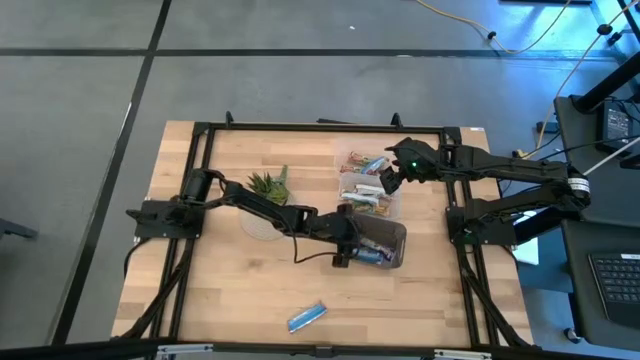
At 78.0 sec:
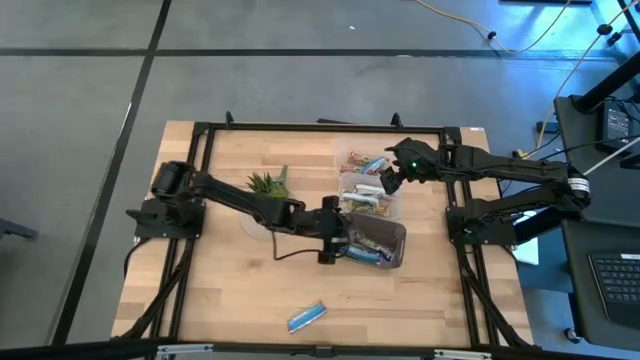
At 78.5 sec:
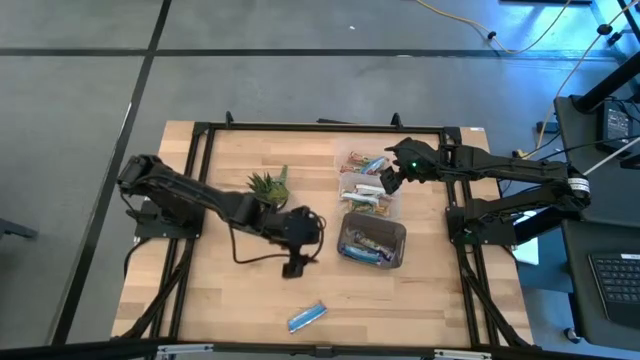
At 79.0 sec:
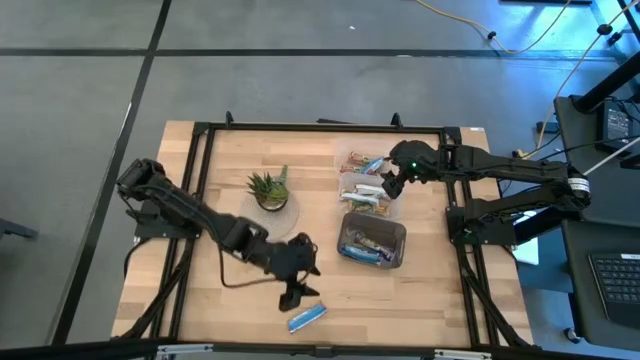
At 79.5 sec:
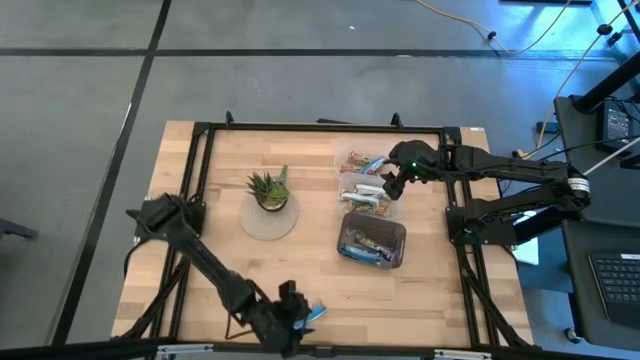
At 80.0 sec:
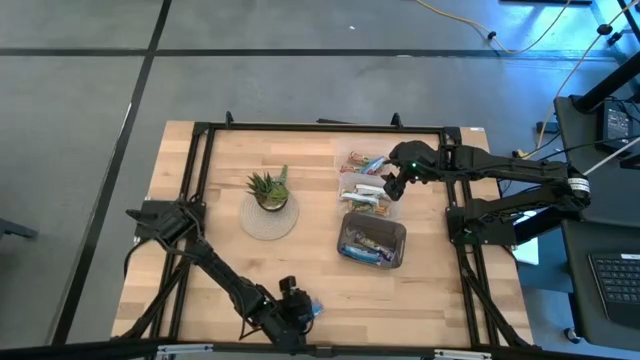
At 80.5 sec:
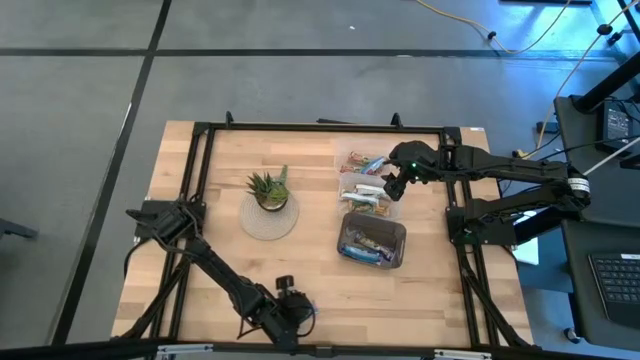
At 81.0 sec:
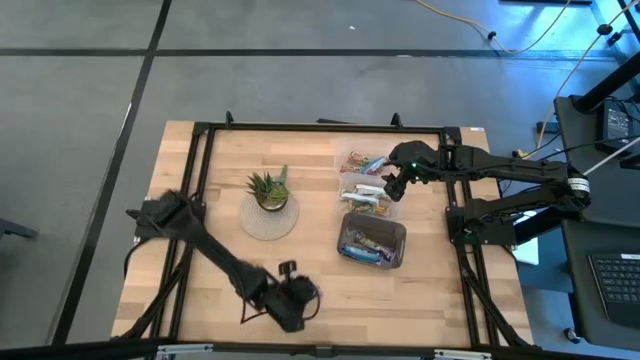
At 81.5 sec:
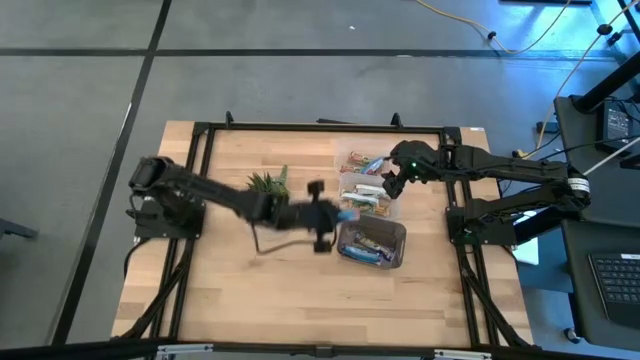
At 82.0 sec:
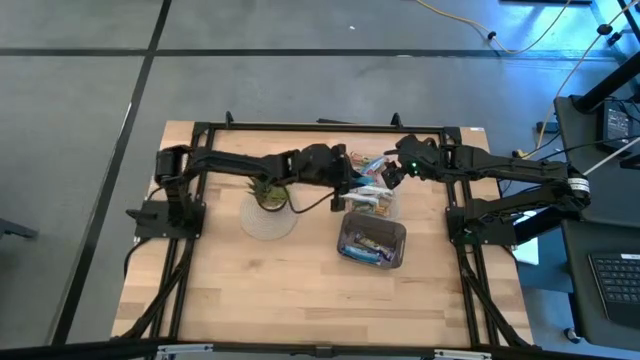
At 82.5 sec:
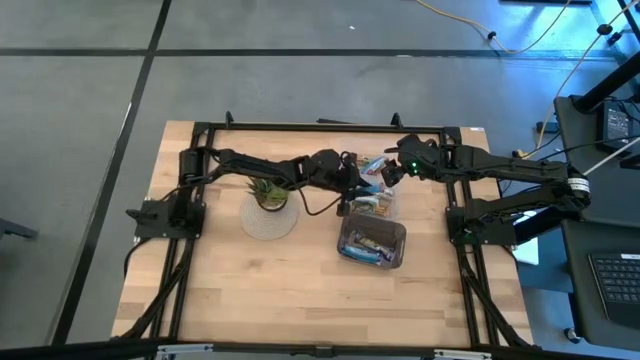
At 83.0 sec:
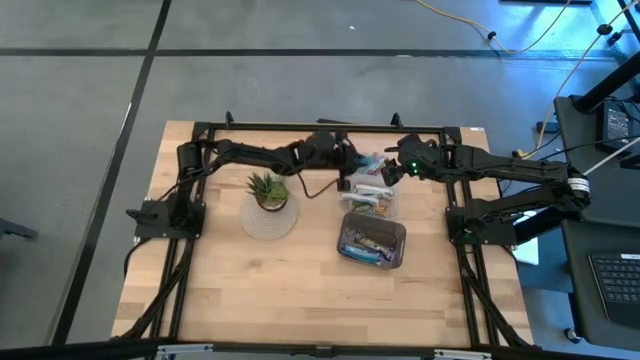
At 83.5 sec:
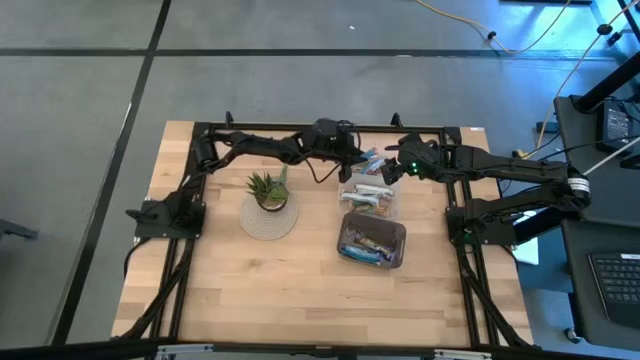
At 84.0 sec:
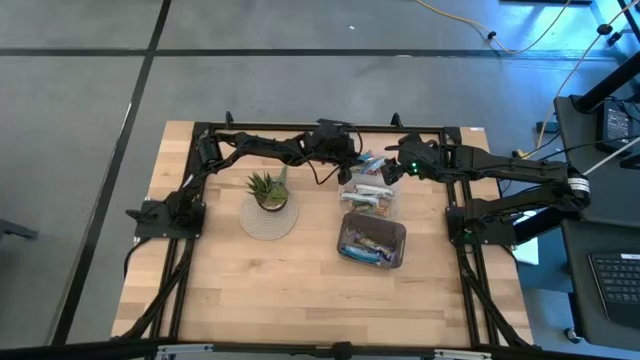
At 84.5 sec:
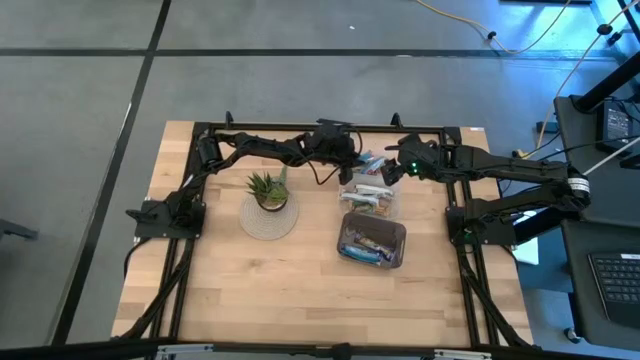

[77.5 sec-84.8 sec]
Task: Pick and place Granola Bars by type
Put the red granola bar into the top transparent bin

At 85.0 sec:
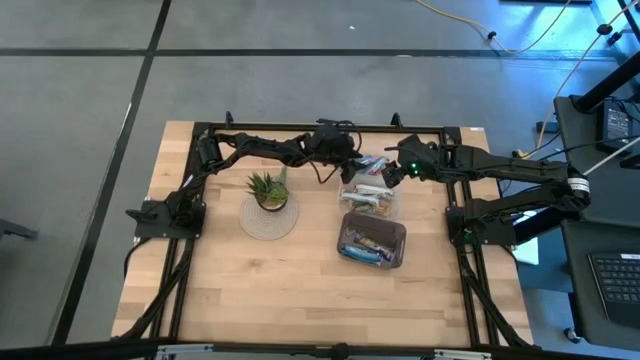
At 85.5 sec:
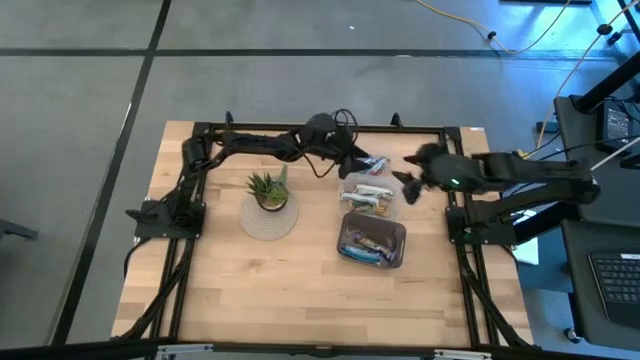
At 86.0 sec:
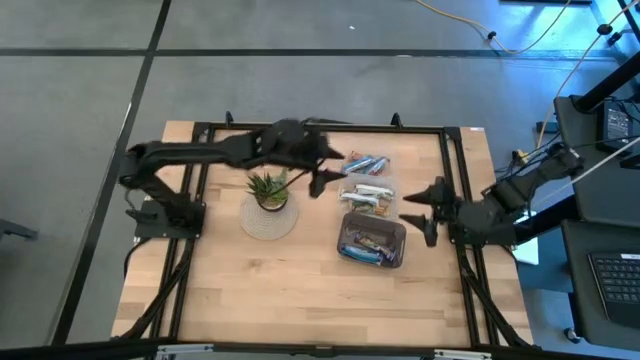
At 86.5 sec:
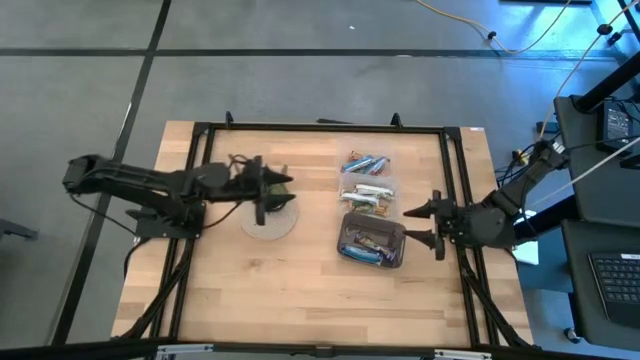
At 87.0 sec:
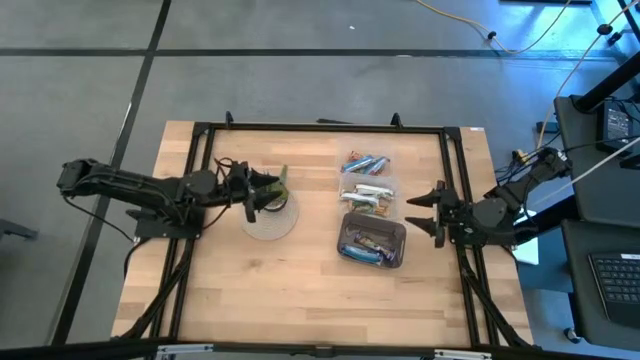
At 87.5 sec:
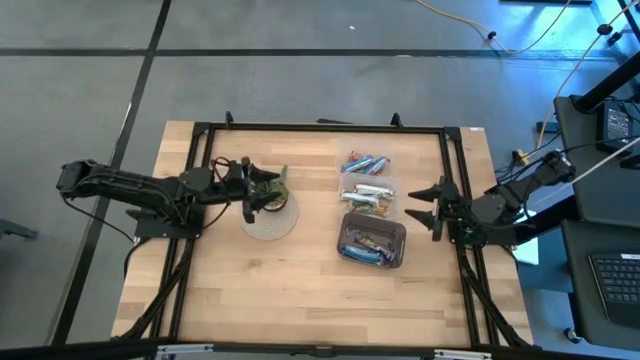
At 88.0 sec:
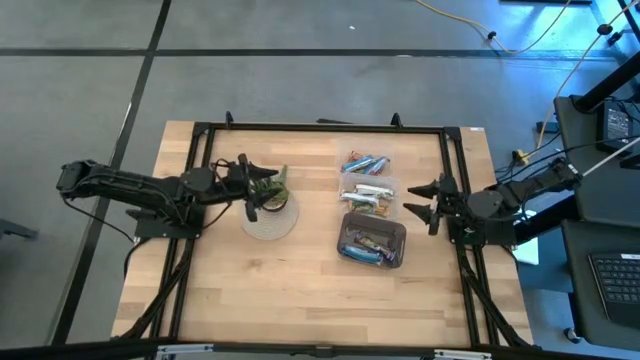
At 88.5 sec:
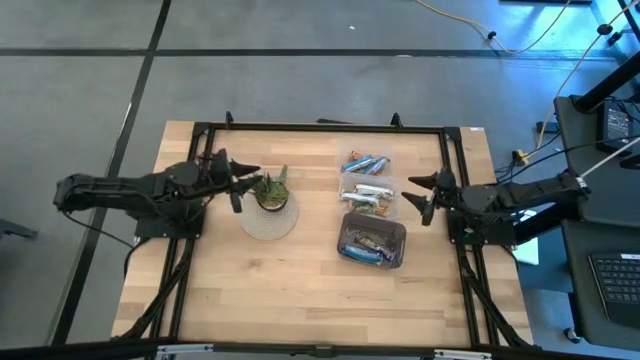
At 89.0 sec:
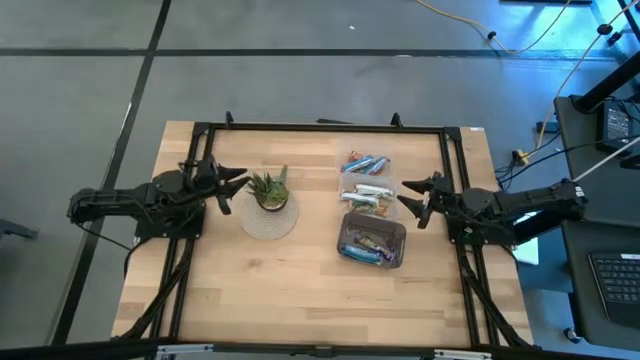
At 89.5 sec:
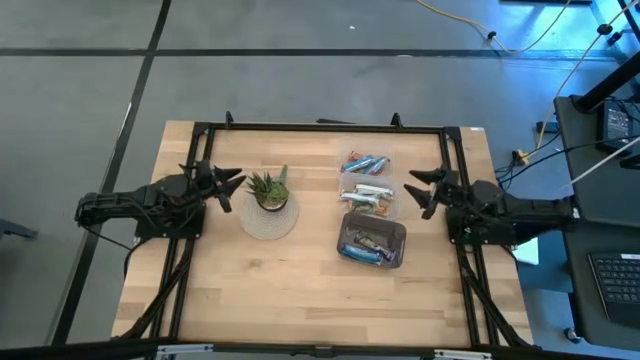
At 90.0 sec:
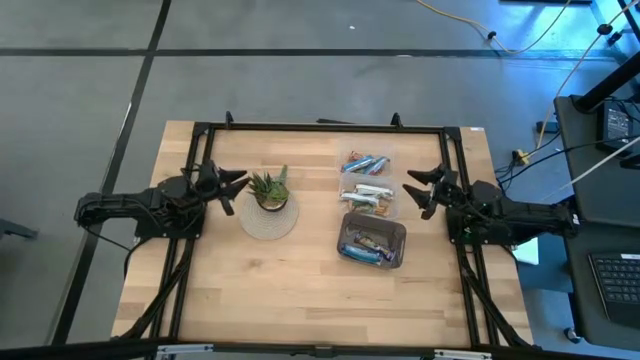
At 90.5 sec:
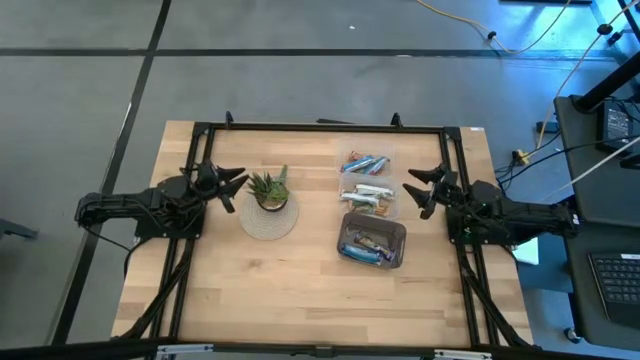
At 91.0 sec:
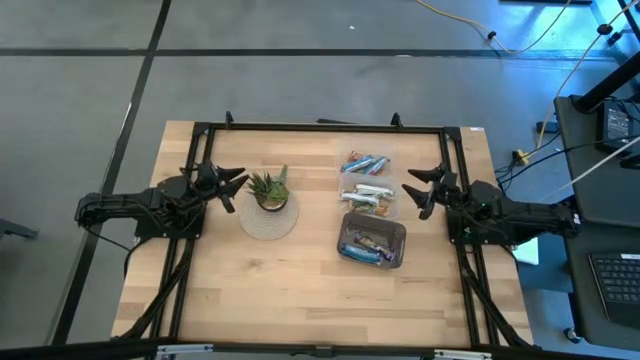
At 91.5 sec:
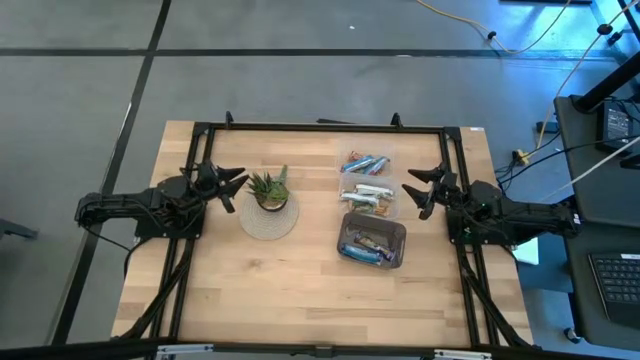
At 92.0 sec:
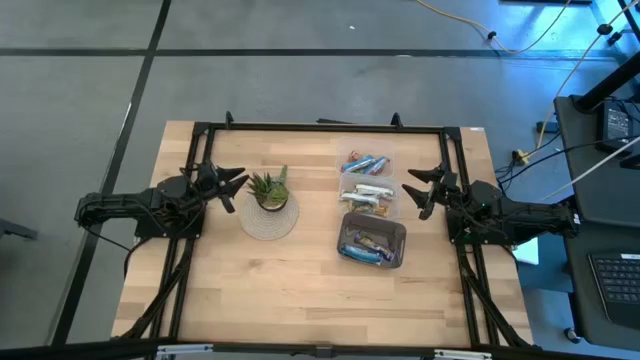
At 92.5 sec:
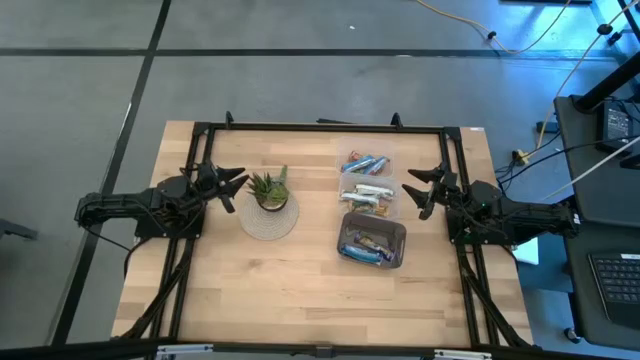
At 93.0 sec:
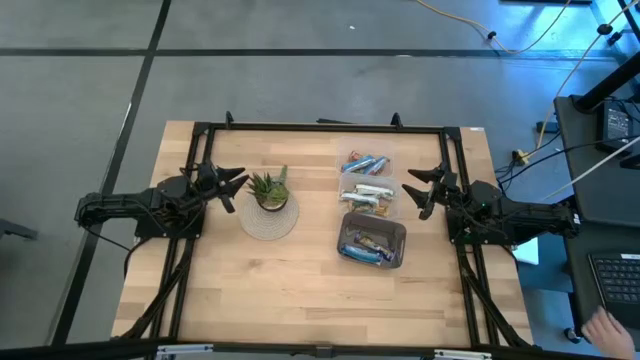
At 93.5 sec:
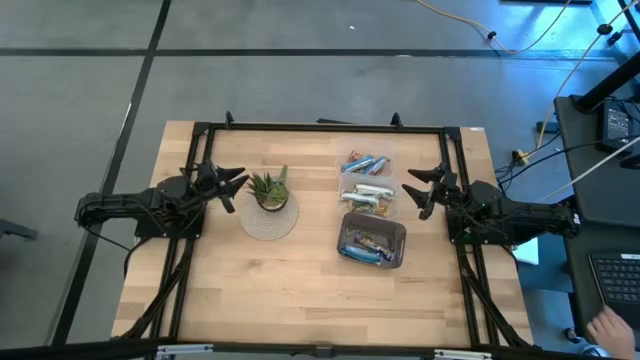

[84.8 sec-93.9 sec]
Return to Home Position

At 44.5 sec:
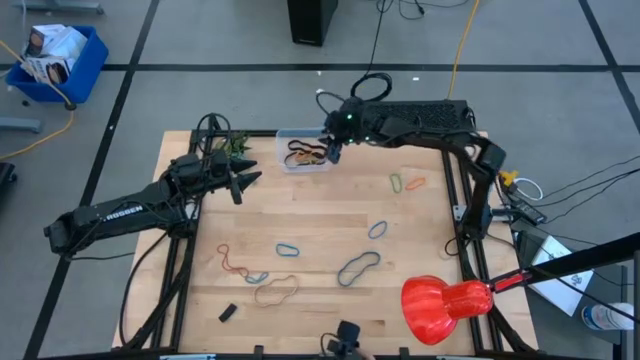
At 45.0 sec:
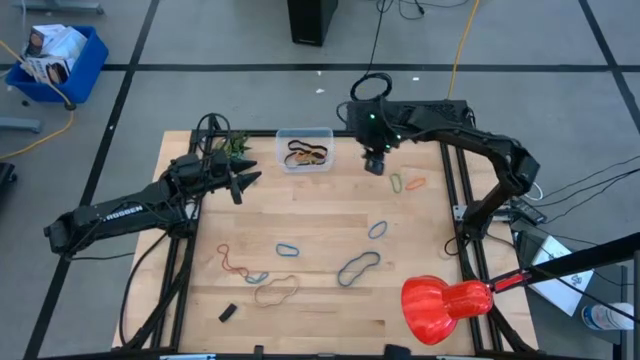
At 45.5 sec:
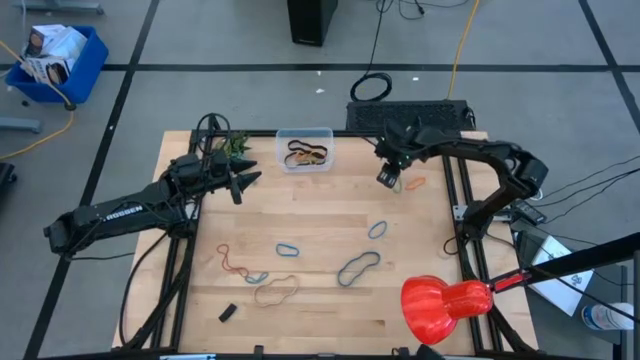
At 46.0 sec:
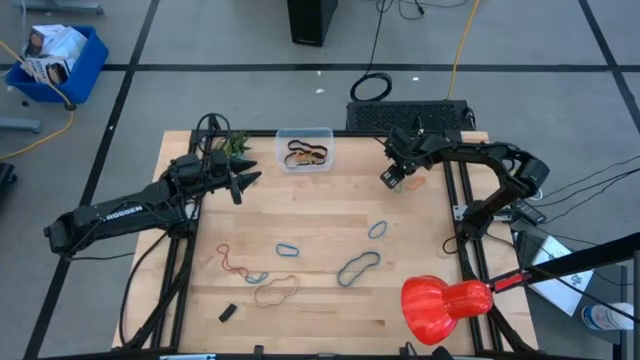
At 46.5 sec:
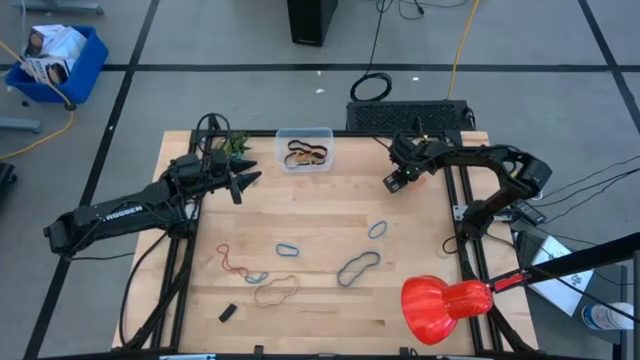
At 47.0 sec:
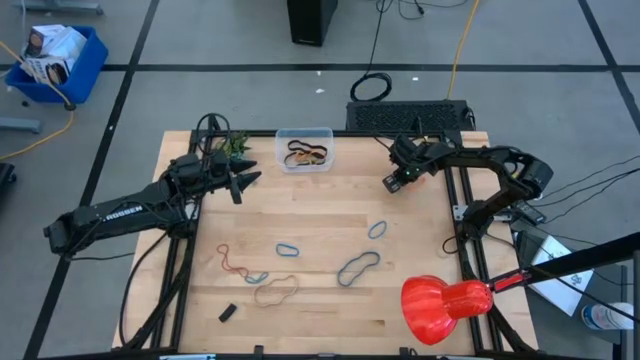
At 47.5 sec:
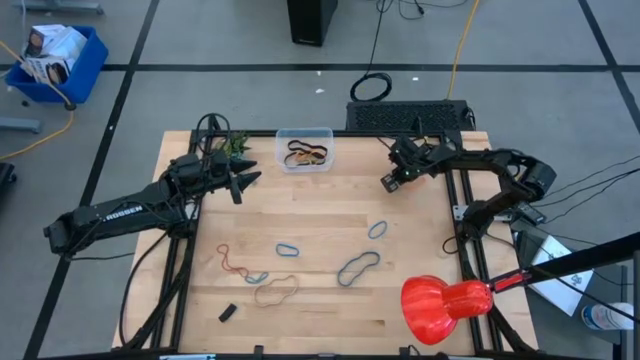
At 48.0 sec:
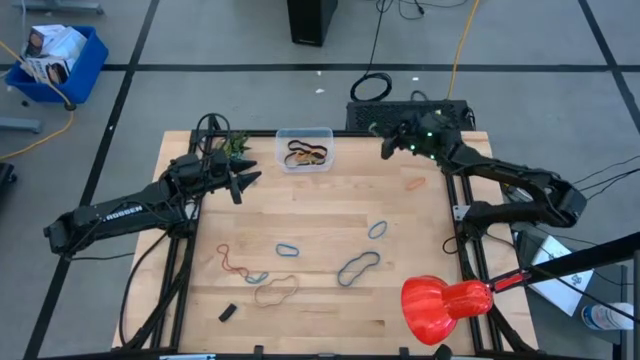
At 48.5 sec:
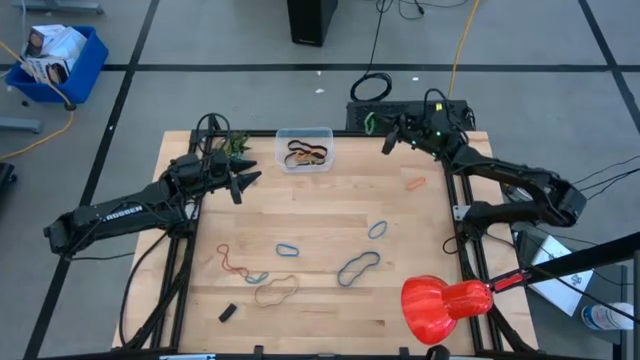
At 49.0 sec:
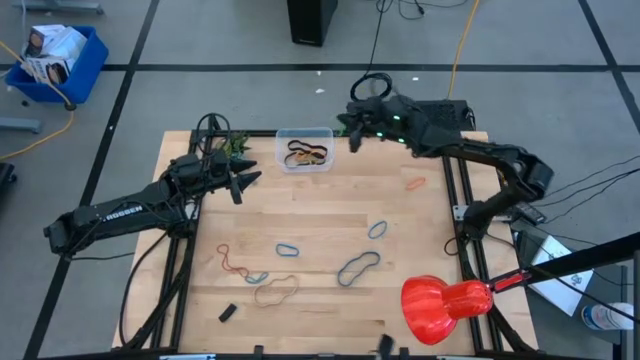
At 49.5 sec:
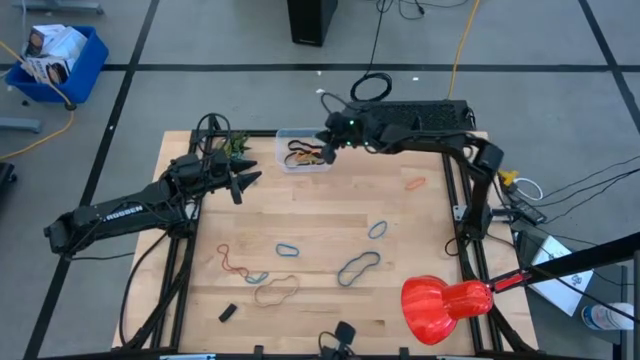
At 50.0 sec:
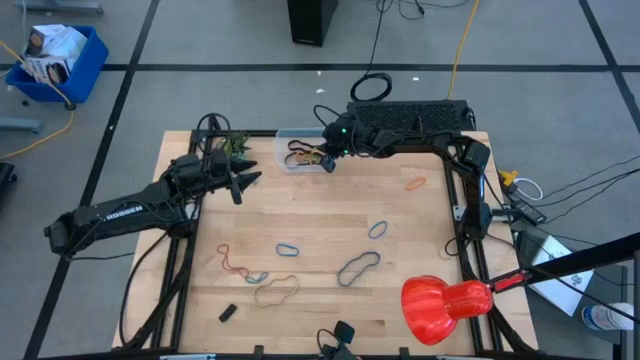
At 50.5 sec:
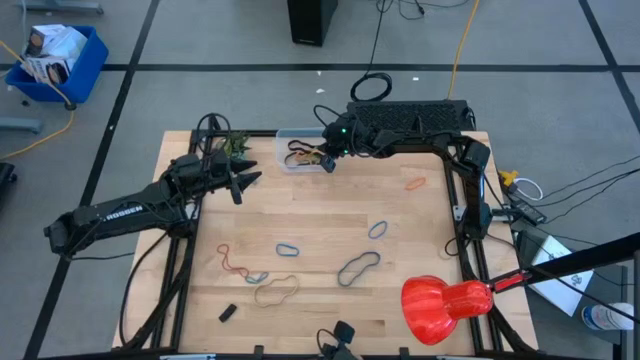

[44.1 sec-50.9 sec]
Task: Pick and place rubber bands into bin
Put the green rubber band into the transparent bin
